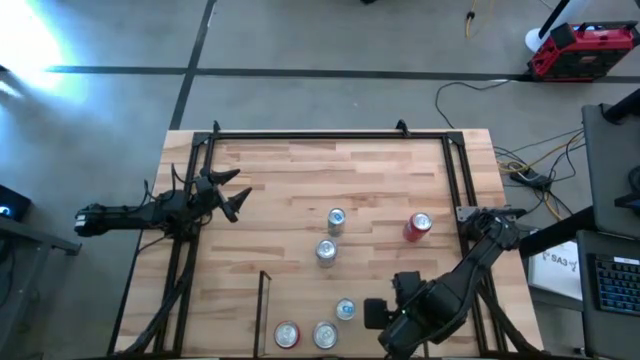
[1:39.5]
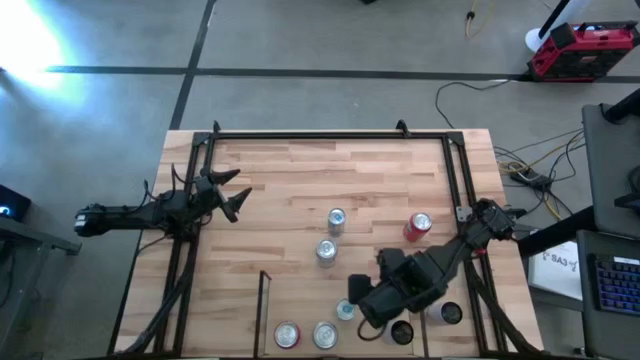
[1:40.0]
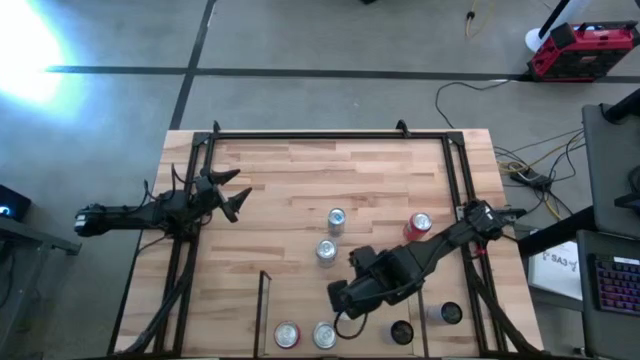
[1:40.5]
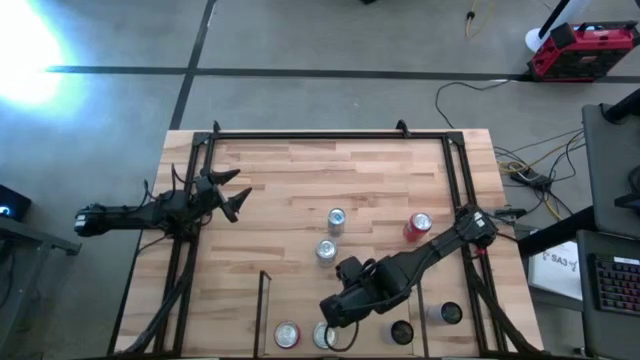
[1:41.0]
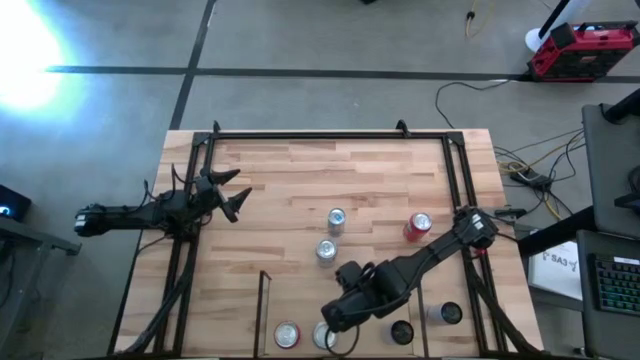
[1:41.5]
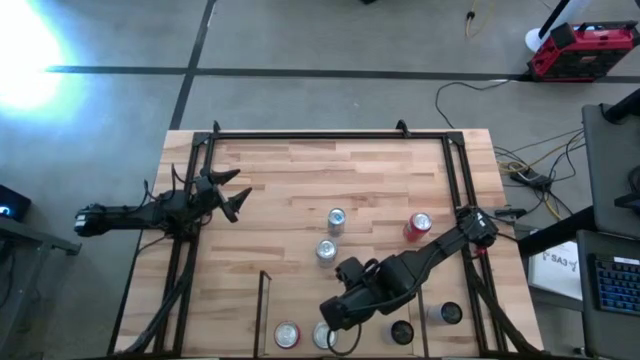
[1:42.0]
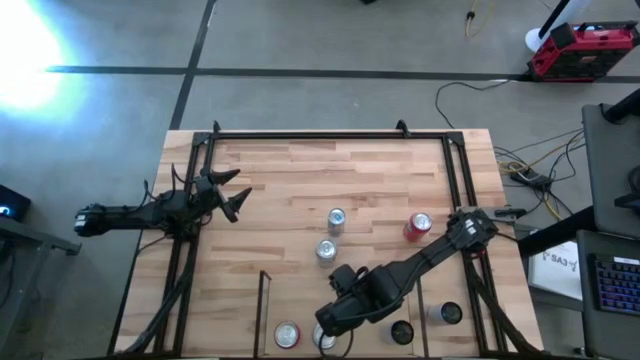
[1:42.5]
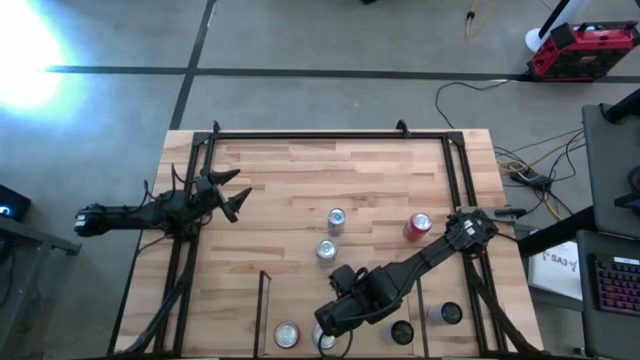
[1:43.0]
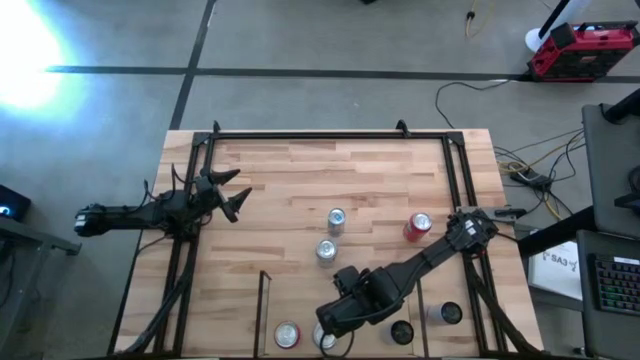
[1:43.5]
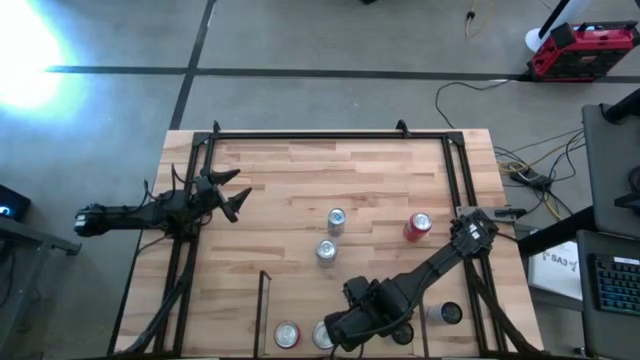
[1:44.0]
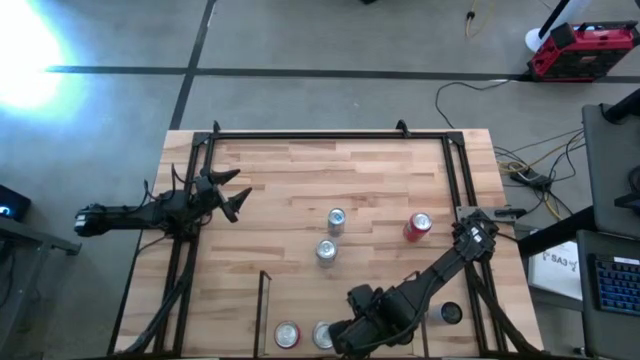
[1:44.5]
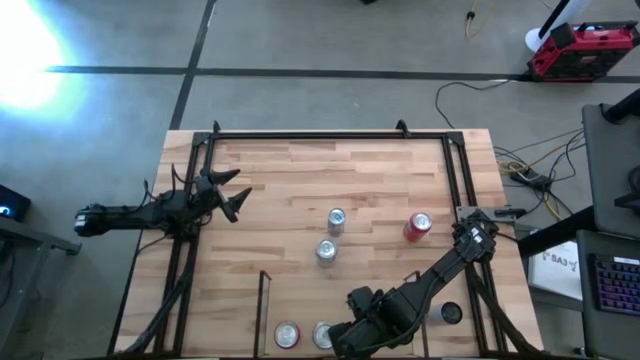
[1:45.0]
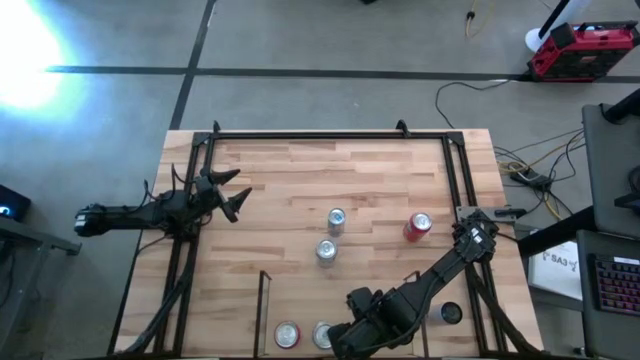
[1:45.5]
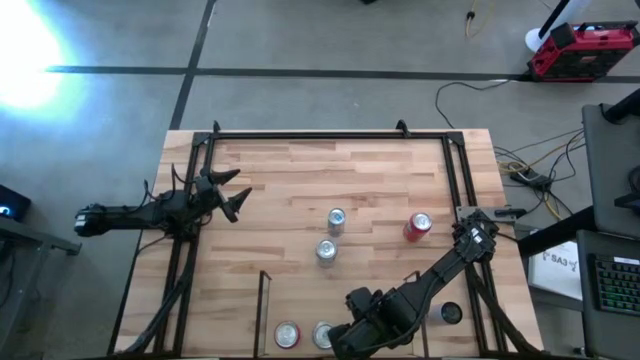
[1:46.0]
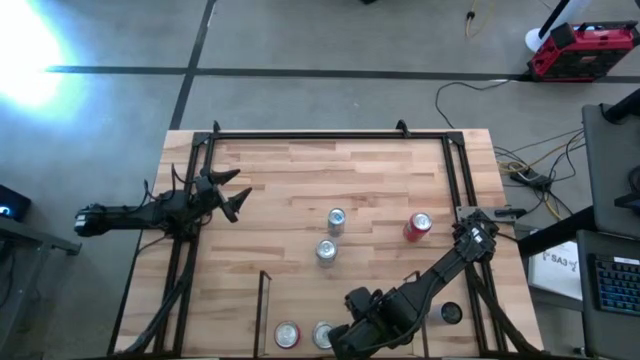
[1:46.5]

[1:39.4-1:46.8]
Task: Place canned beverage on shelf
Adjust the blue soda can on the shelf

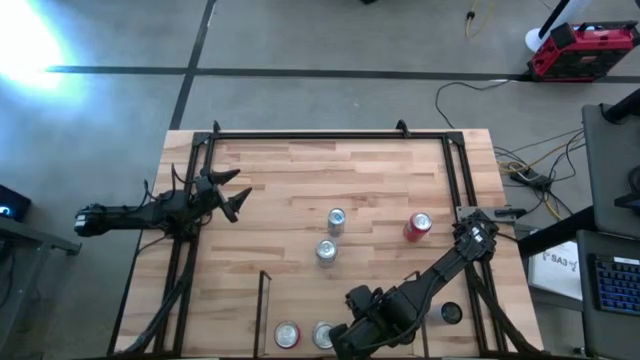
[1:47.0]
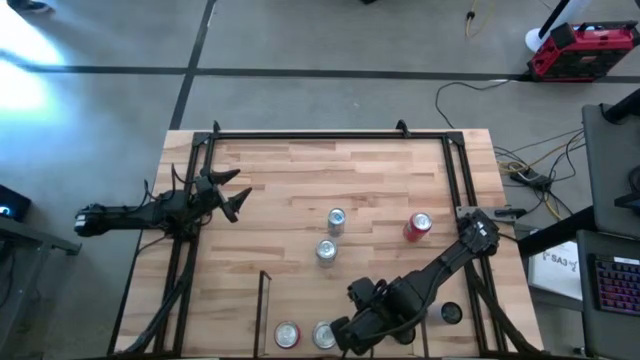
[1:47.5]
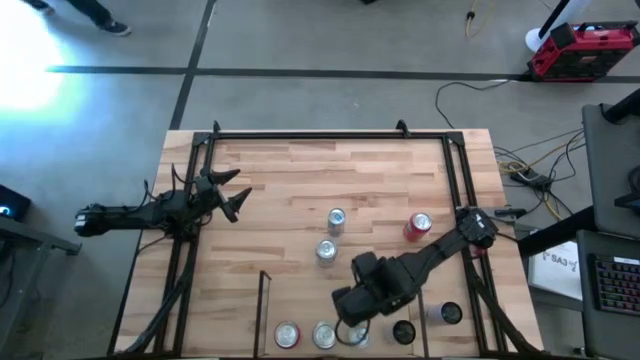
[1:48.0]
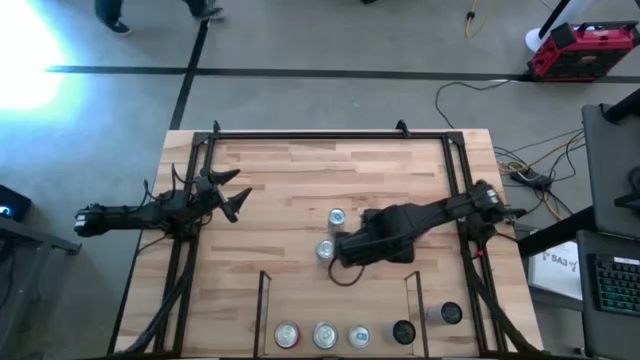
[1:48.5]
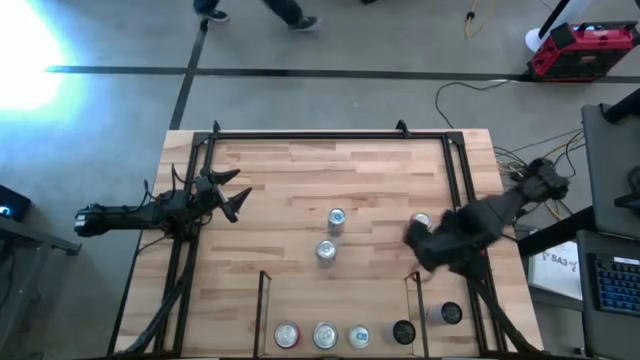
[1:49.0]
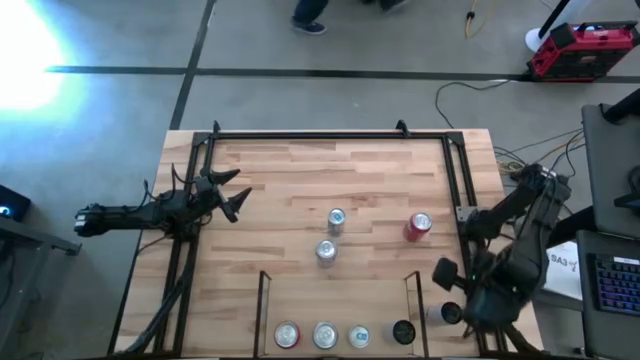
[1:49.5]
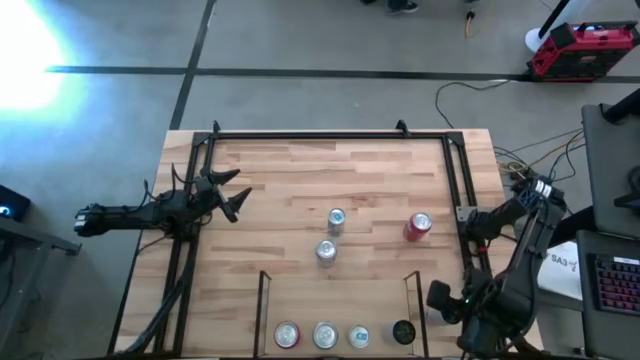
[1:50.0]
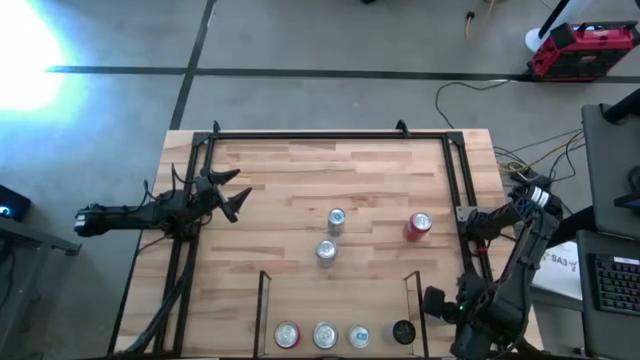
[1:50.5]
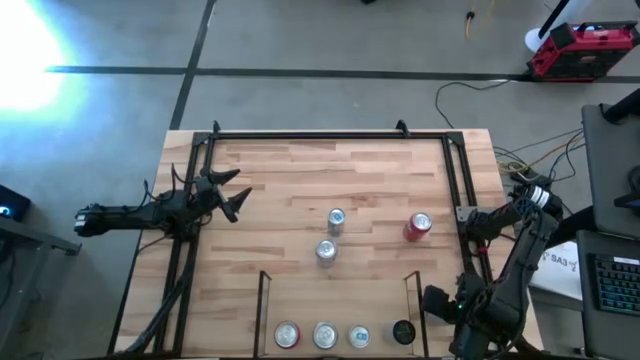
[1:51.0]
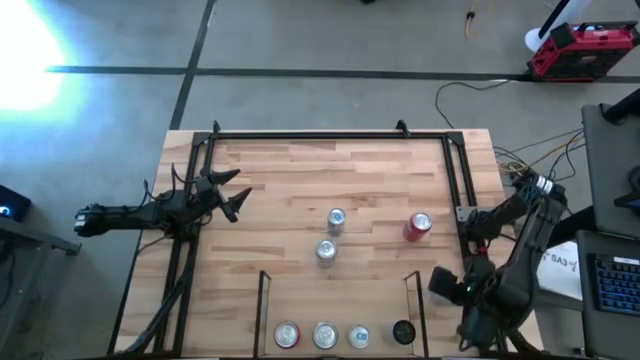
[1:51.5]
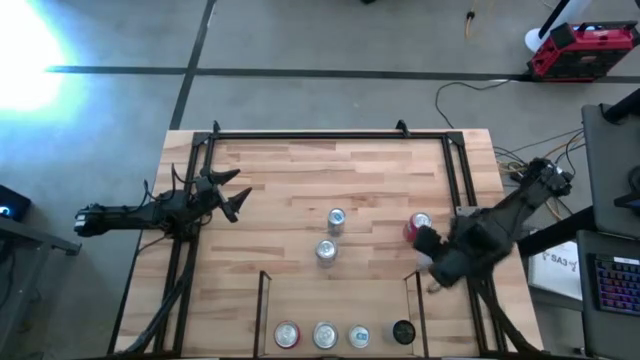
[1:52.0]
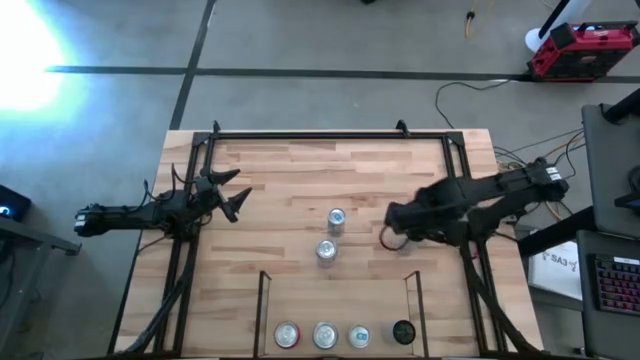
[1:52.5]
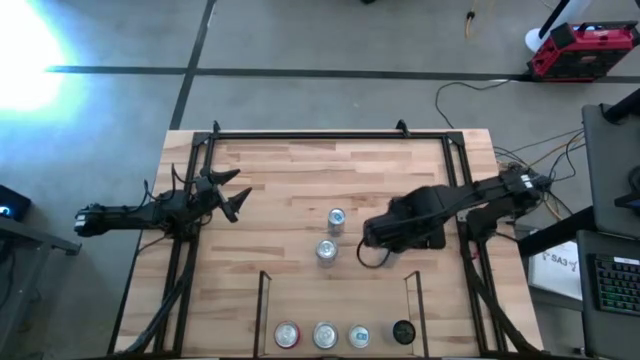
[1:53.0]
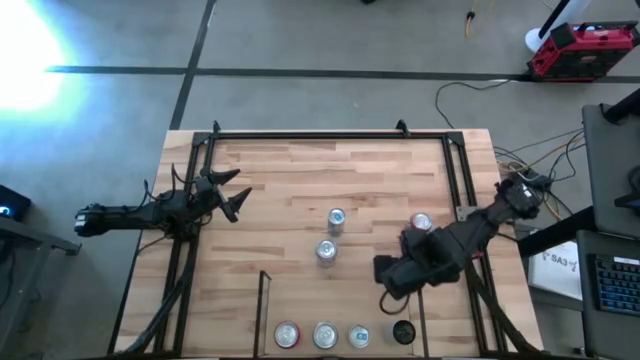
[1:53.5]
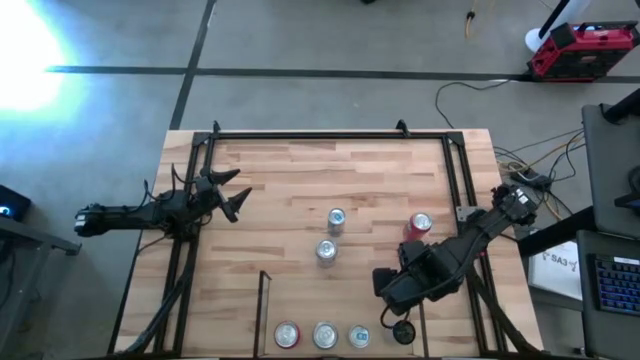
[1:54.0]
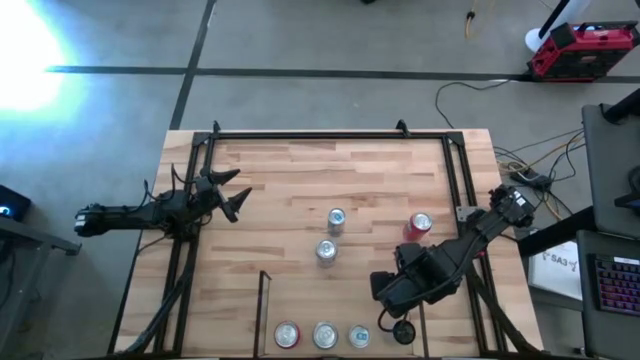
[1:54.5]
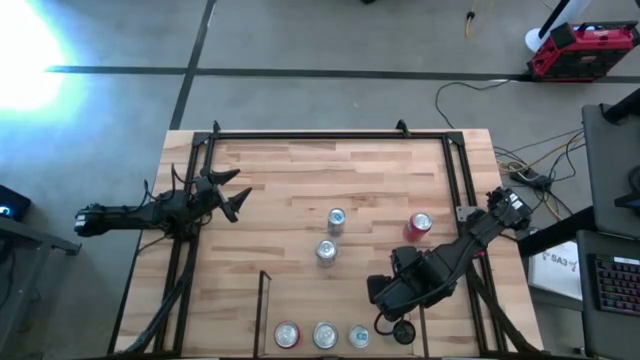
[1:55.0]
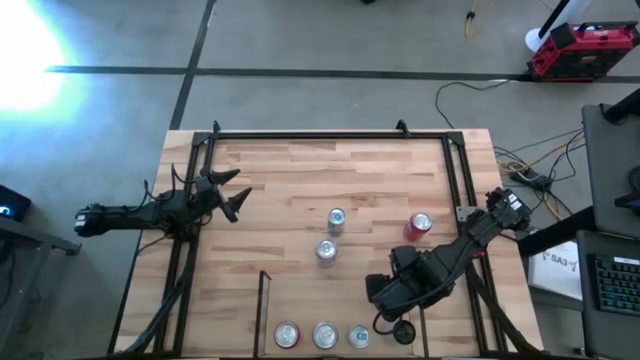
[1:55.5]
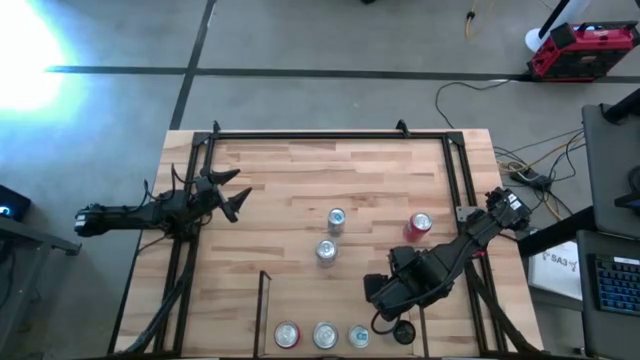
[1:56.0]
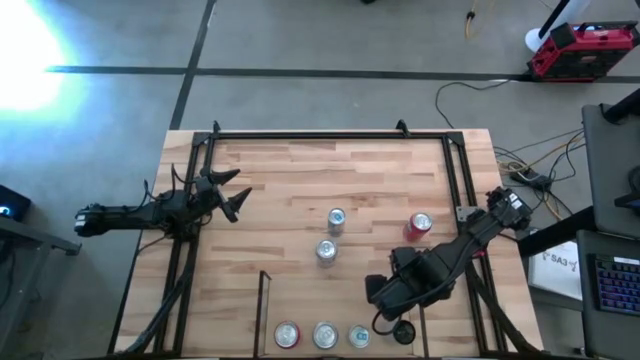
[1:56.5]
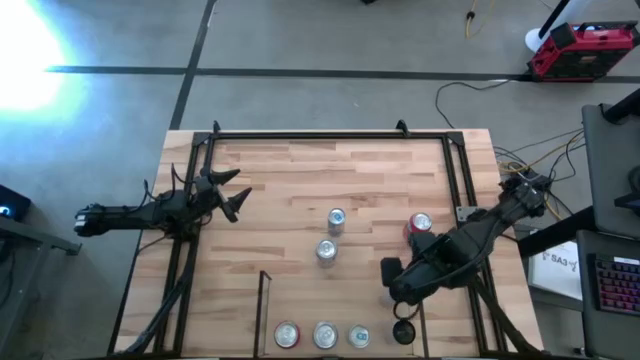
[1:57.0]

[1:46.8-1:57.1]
Put the white pink soda can on the shelf aligned with the other white pink soda can

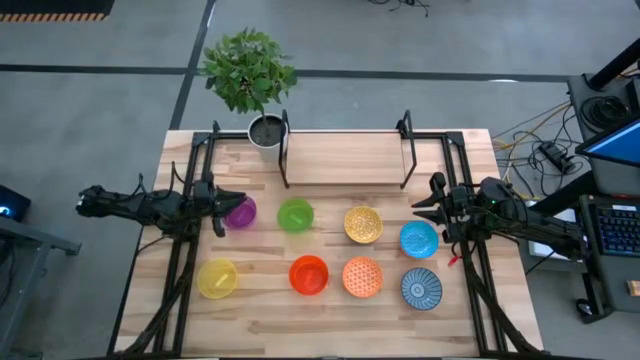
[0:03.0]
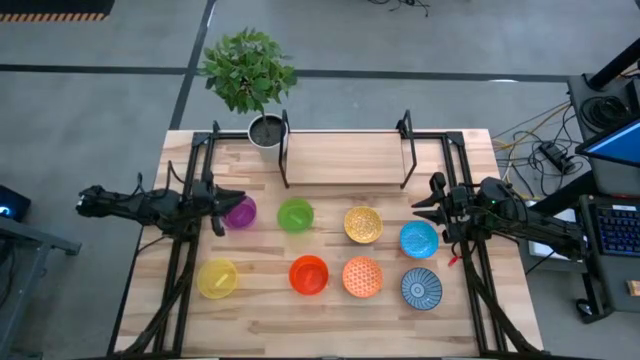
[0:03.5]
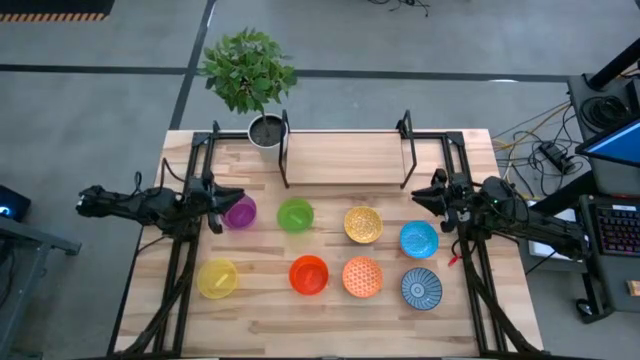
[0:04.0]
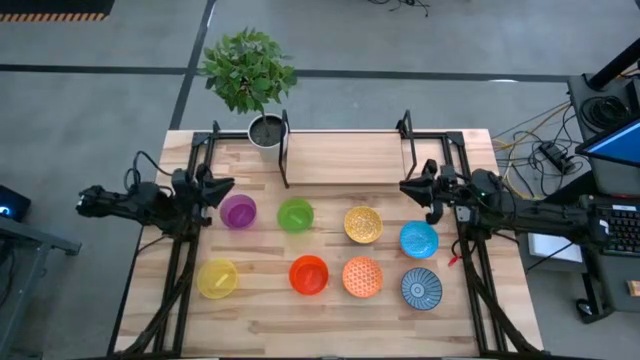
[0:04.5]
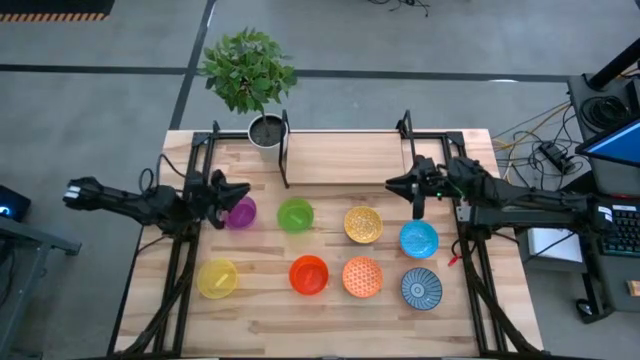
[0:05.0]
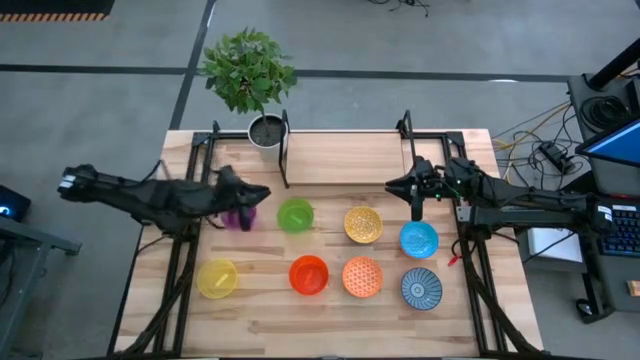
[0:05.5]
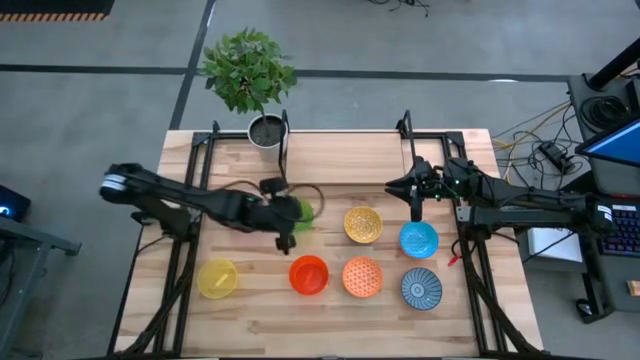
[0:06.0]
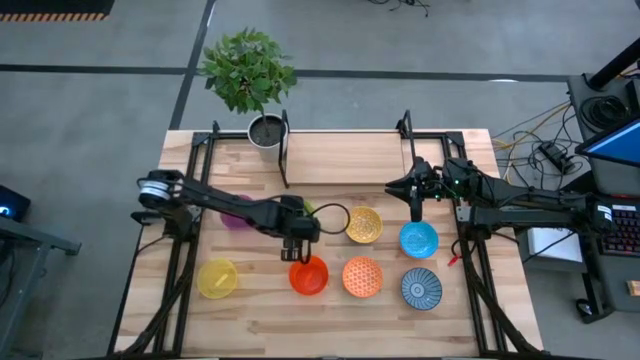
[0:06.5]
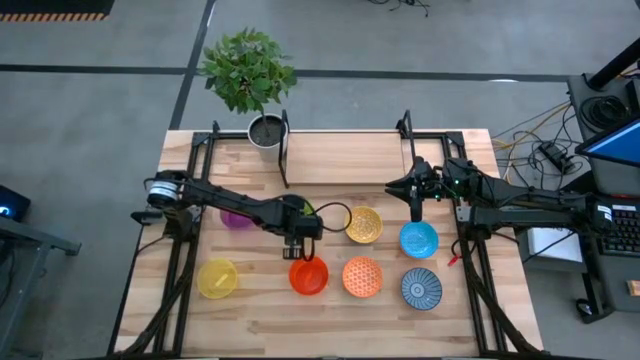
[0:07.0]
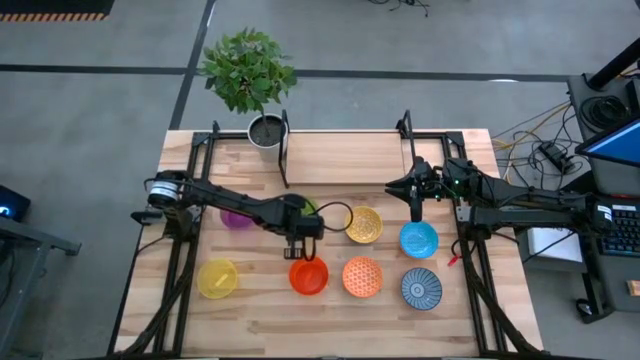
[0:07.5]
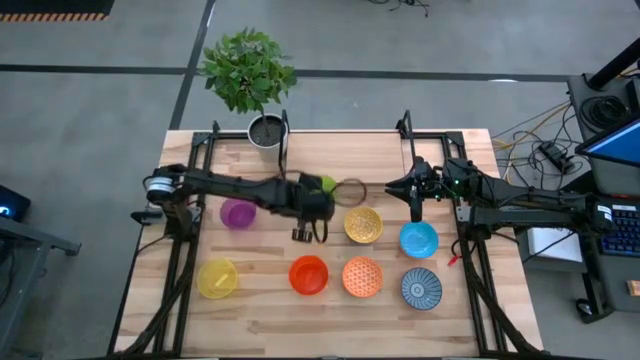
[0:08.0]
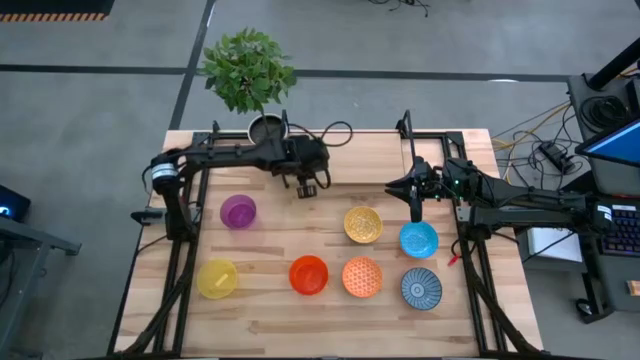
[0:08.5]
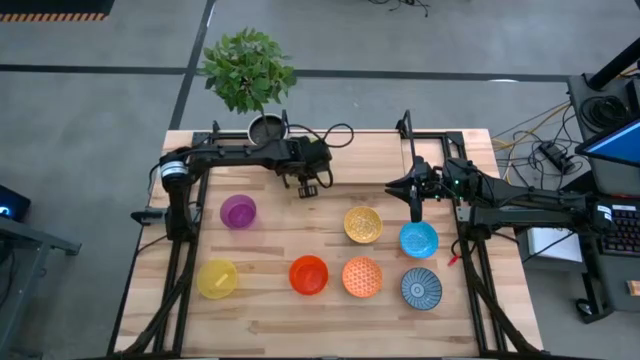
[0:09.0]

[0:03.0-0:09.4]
Task: Place and stack bowls onto a shelf
Put the green transparent bowl on the shelf
